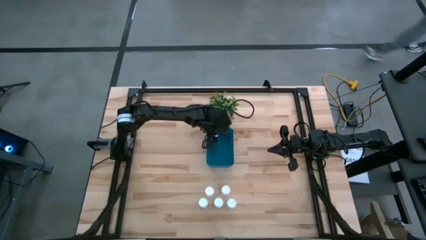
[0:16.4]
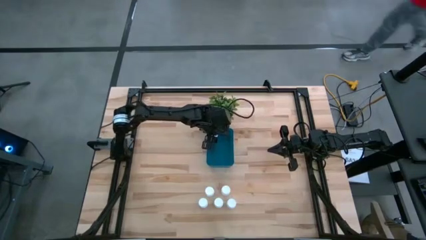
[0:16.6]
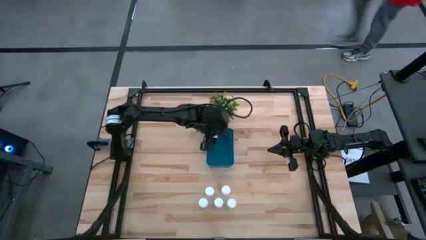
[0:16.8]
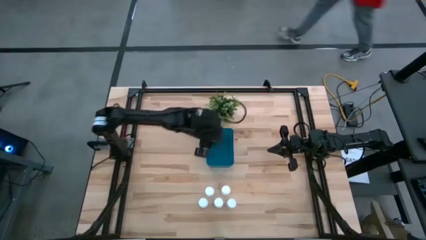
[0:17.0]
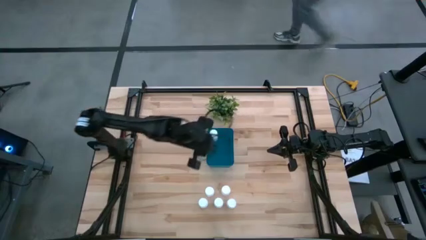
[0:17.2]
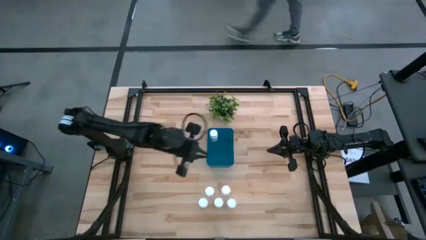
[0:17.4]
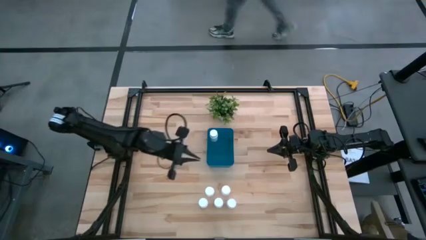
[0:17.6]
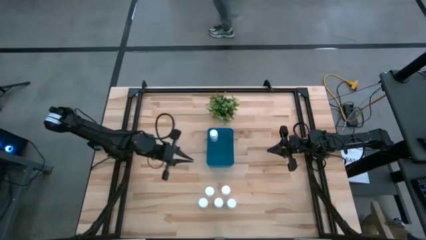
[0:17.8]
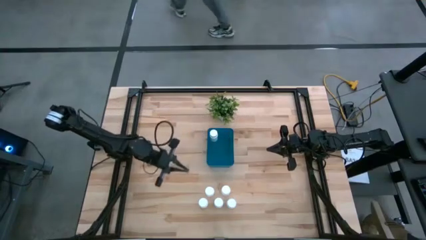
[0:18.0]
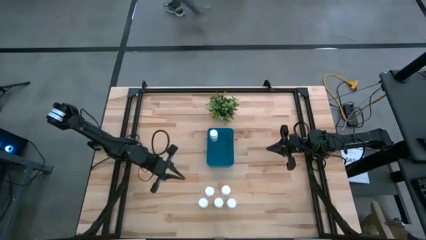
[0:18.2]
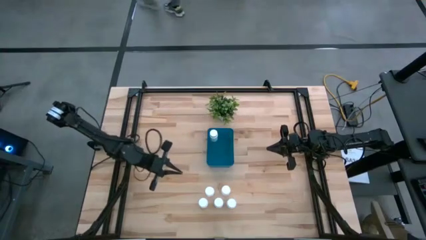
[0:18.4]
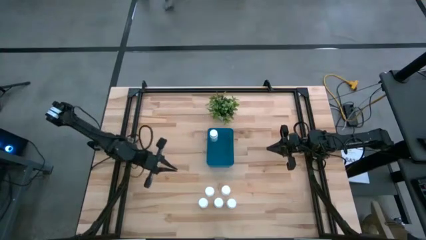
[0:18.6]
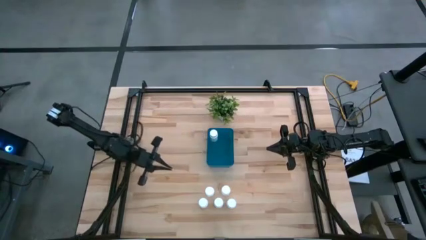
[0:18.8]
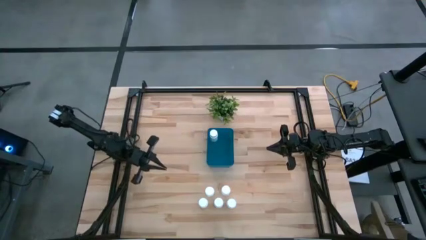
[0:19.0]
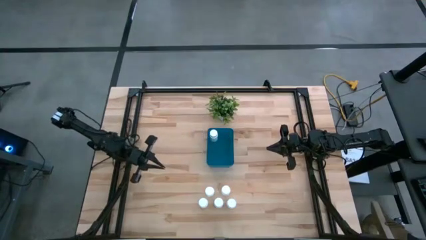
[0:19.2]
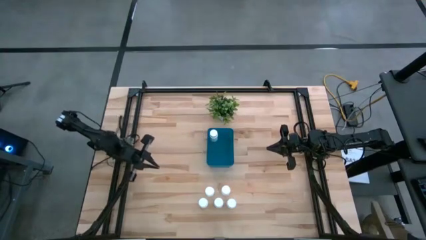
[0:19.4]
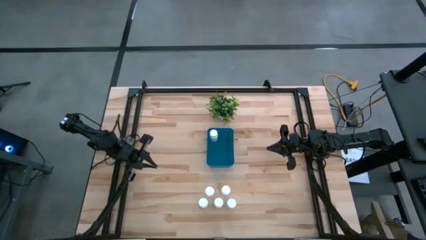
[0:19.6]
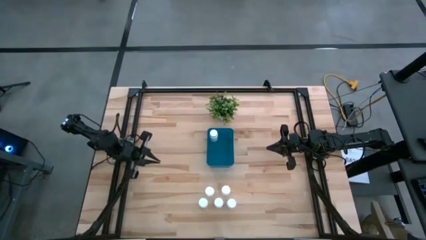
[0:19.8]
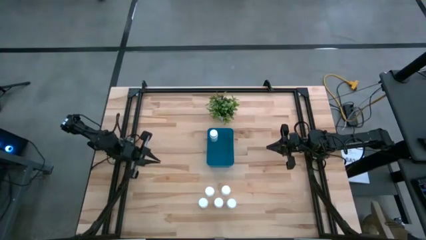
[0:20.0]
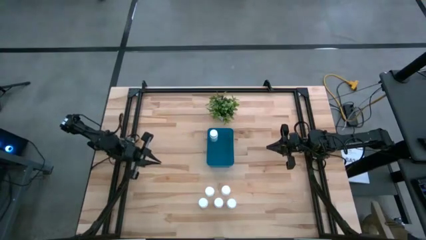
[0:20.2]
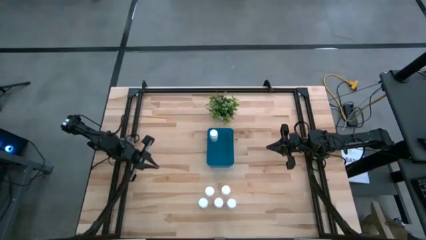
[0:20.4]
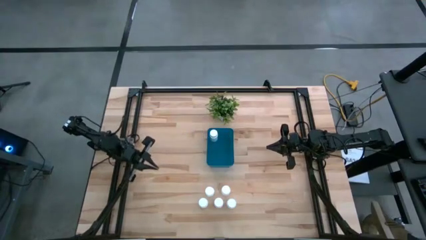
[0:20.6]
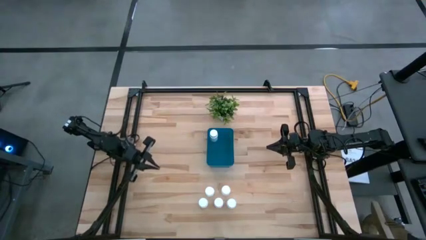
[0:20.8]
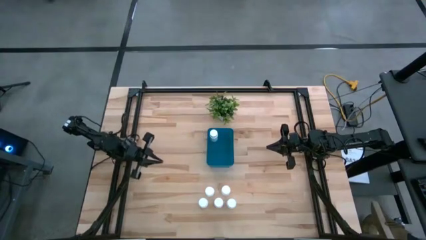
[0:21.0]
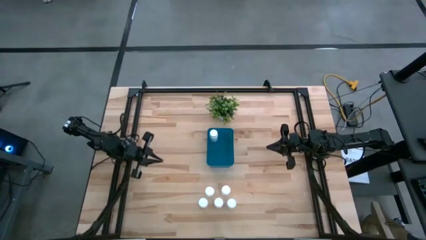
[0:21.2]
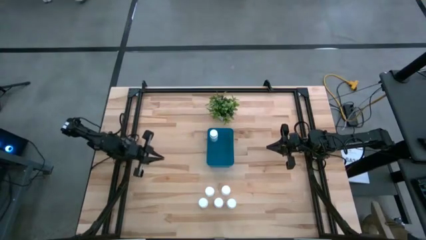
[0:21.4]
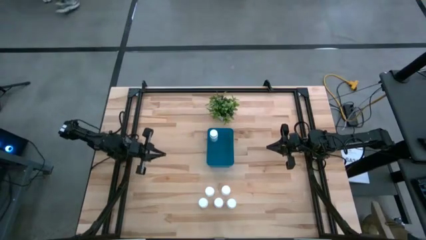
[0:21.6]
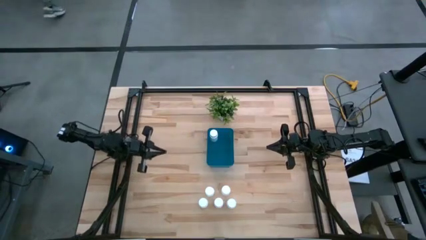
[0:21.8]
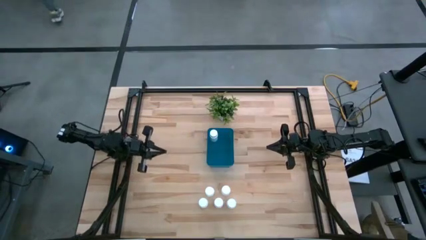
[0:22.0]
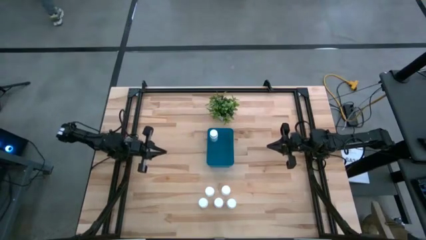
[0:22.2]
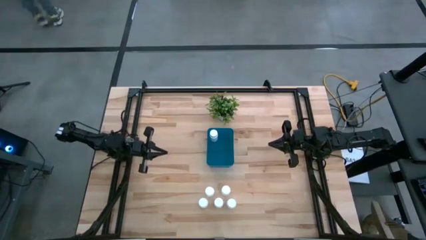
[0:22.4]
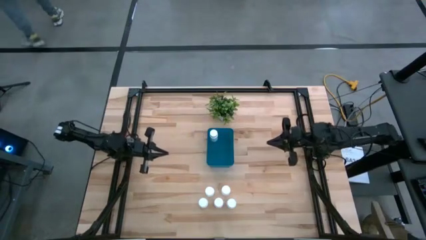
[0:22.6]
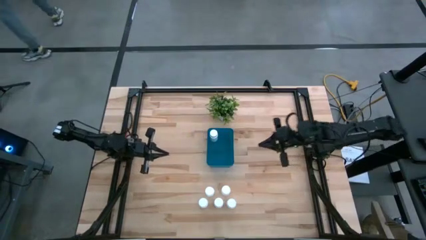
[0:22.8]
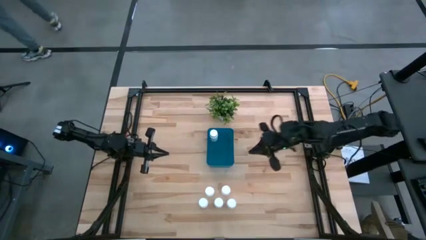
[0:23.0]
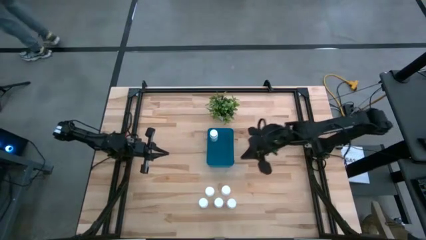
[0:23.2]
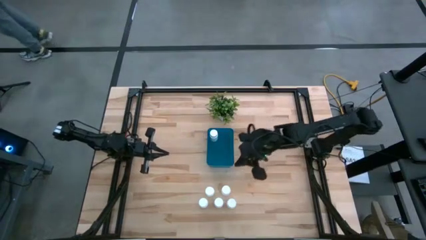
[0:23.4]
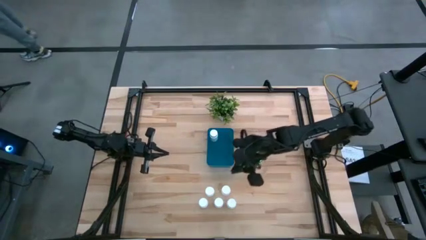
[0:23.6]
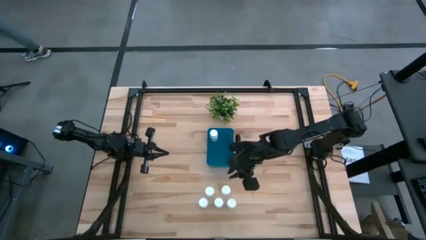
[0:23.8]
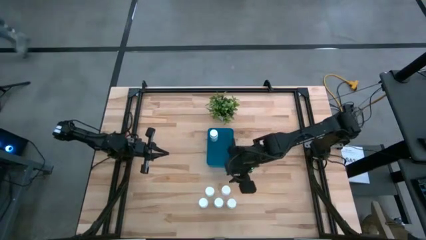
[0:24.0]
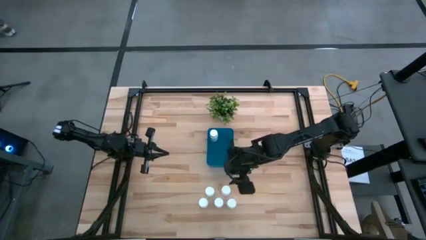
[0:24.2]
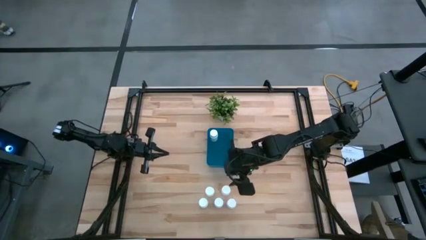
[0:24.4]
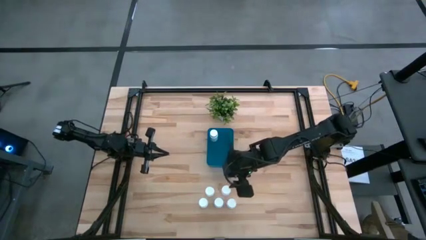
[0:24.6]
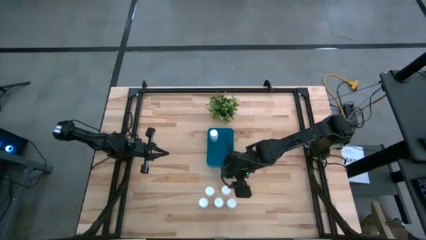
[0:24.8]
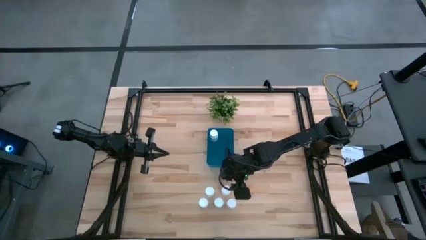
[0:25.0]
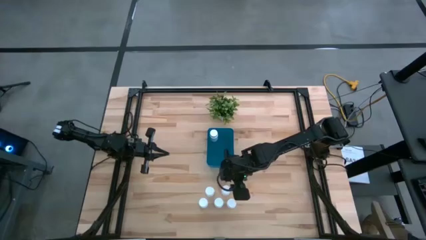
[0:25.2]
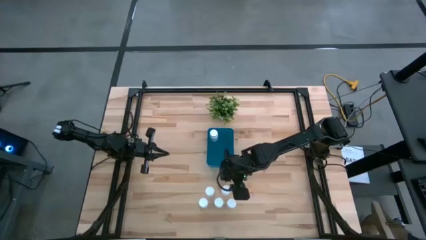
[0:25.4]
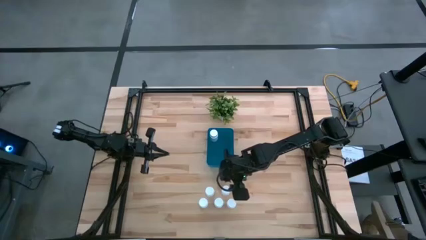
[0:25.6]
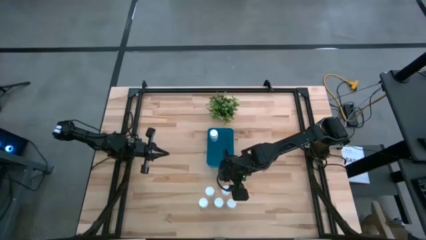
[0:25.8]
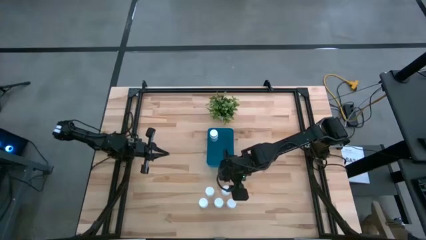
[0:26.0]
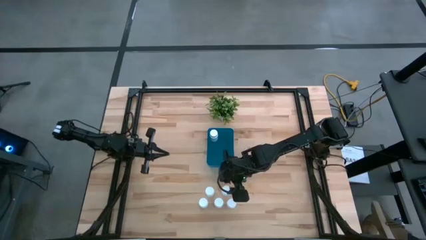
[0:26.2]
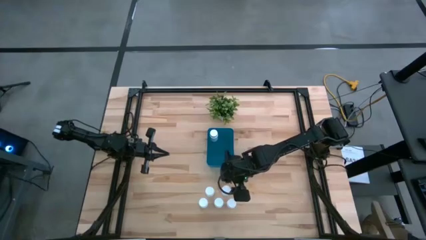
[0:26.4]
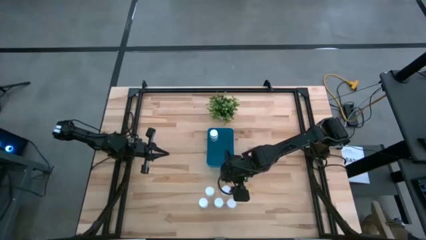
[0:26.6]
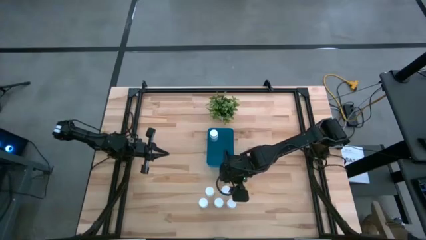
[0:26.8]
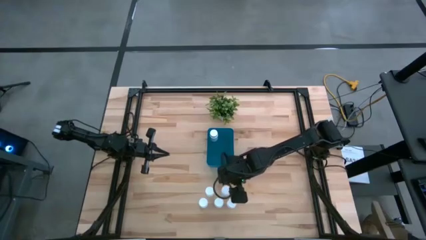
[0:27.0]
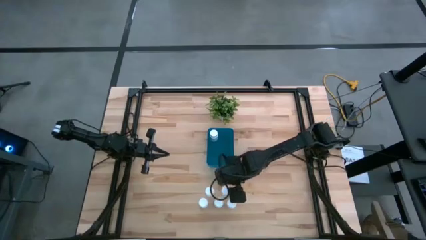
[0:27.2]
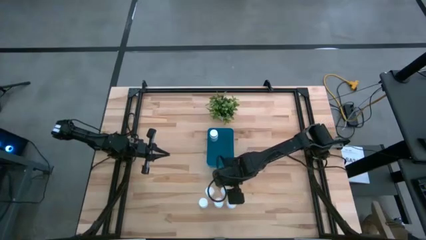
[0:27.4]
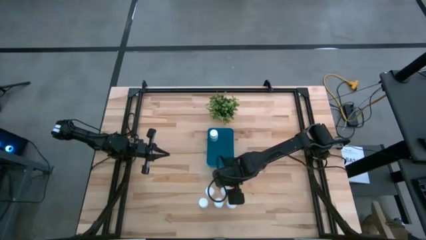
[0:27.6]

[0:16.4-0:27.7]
Task: Pick and place pill bottles into a basket
Put the white pill bottle into the blue bin
